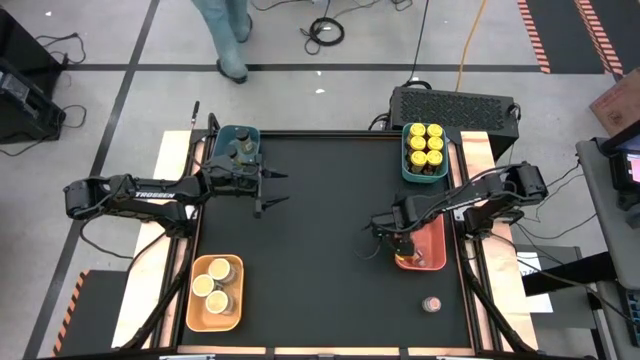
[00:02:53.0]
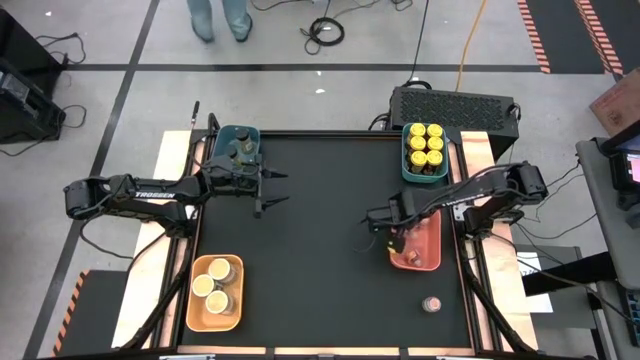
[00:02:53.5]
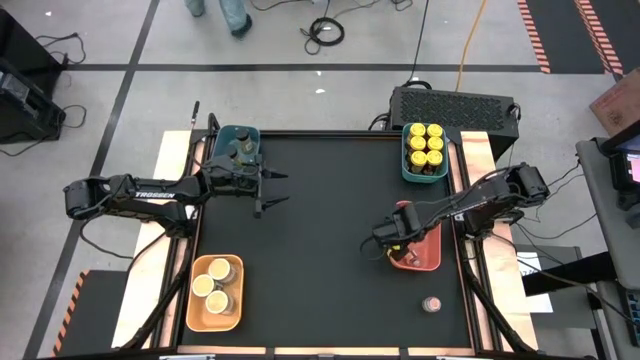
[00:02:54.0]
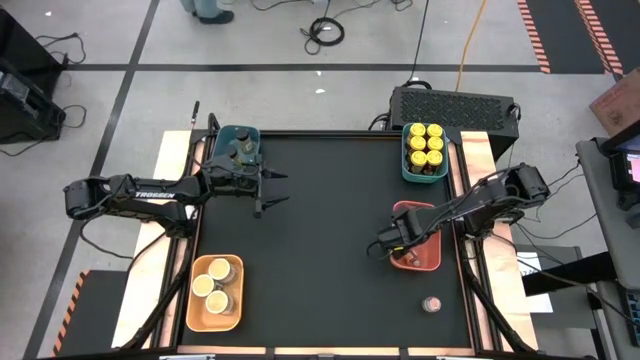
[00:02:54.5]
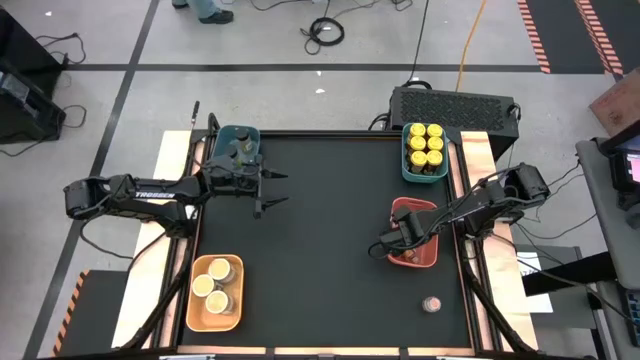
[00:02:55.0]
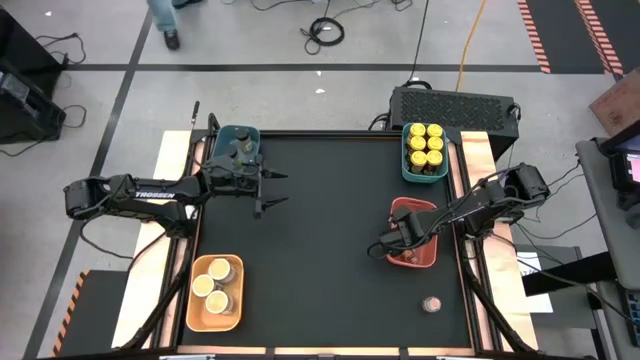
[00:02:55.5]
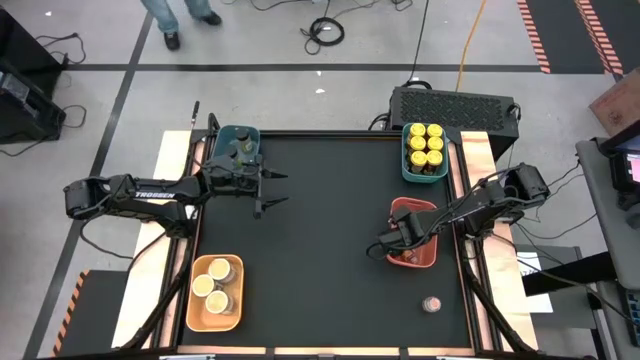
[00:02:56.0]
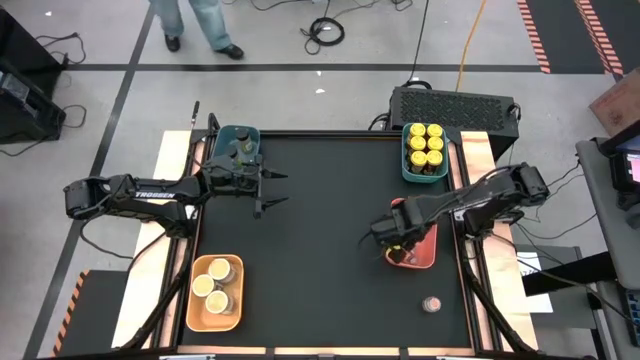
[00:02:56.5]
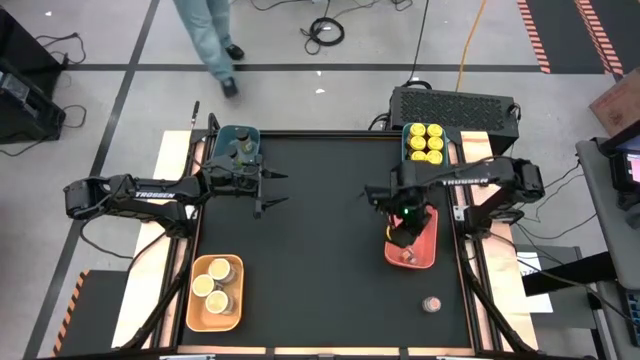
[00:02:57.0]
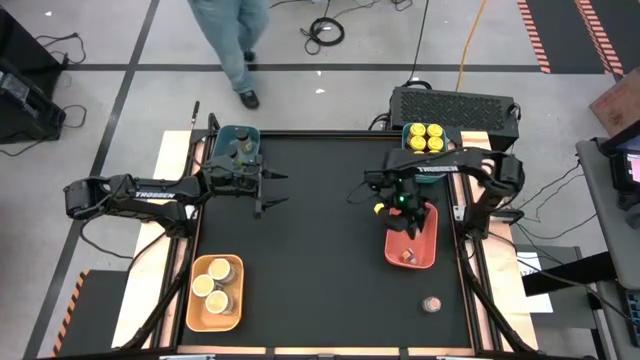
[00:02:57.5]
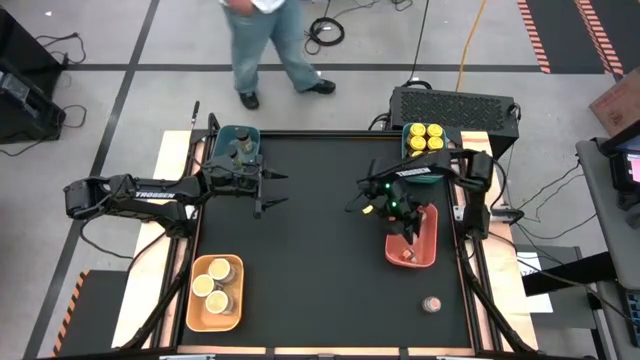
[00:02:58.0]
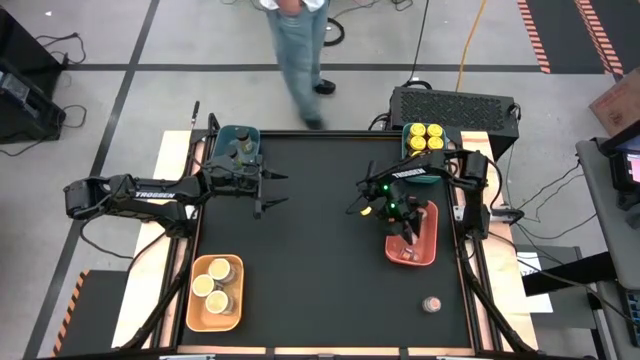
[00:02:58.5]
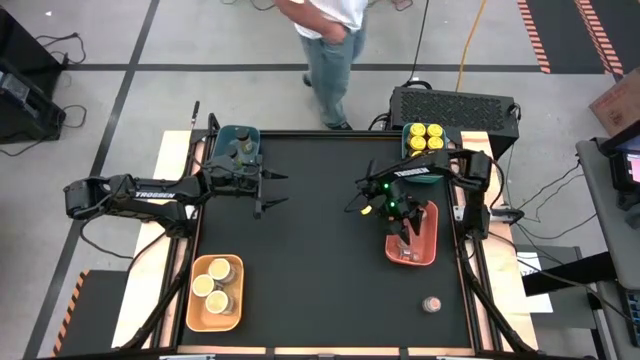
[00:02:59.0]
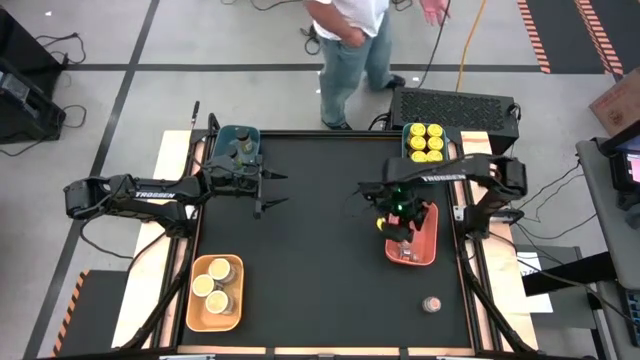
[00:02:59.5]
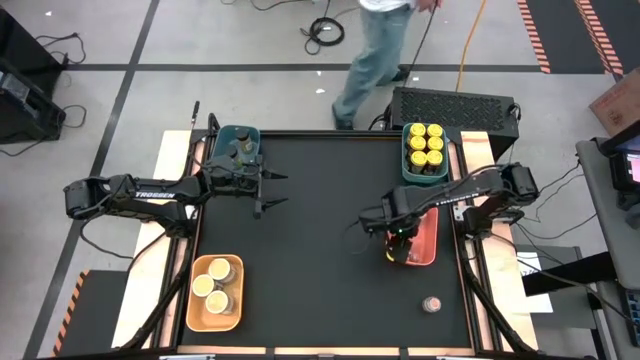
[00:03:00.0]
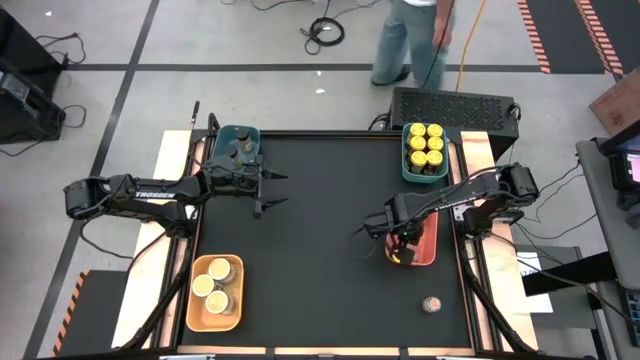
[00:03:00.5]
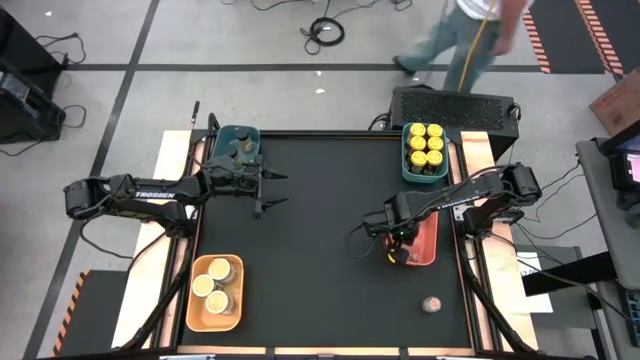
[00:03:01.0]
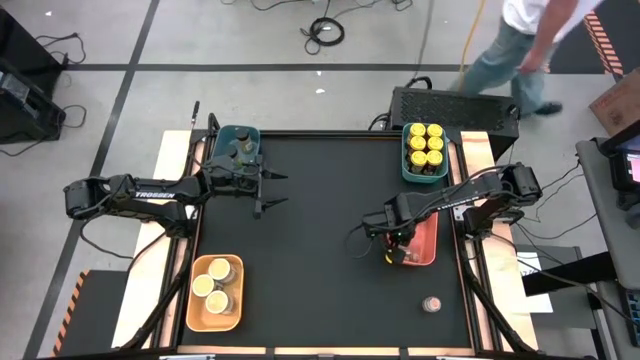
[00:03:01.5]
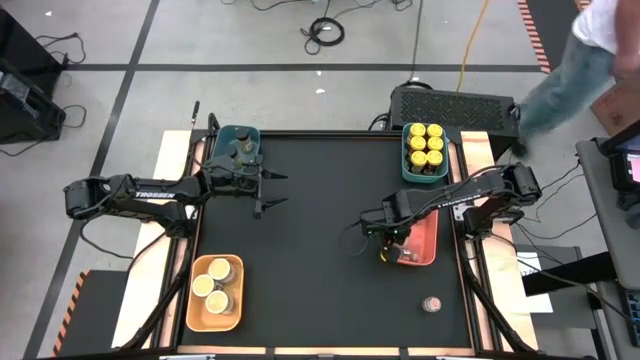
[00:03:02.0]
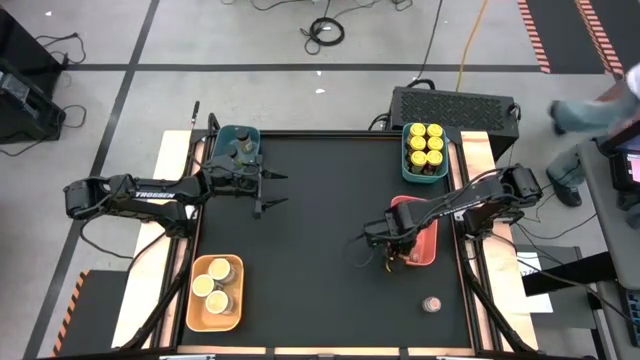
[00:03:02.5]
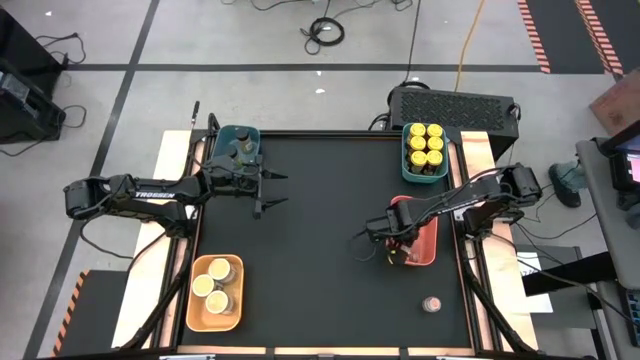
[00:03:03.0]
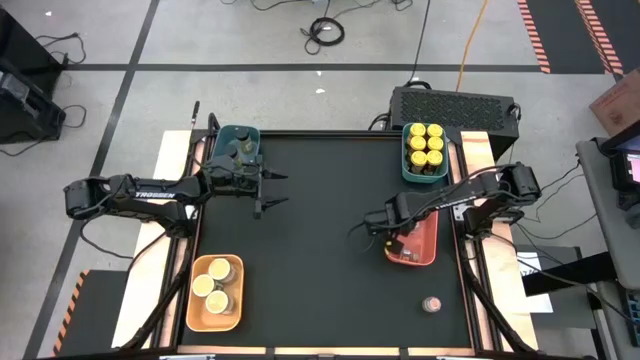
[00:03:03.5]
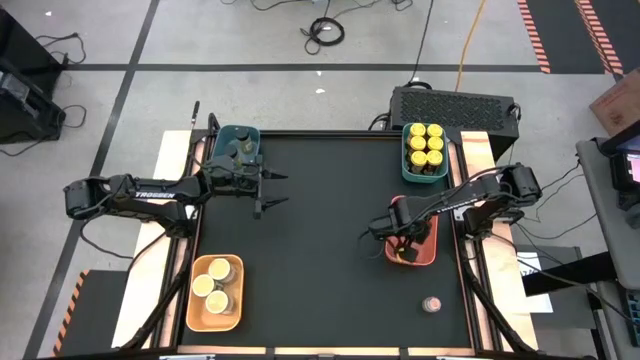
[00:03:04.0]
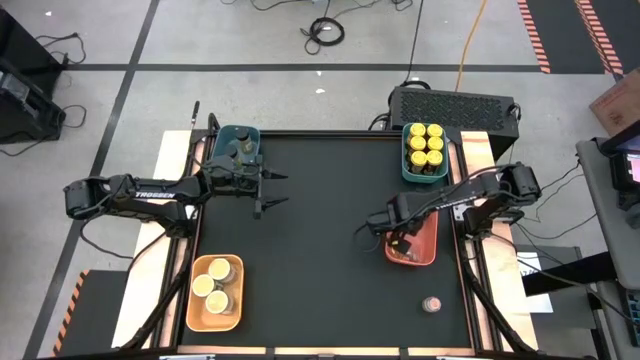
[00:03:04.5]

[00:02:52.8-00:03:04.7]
Task: Sort spices by type
Adjust the brown spice bottle into the orange bin

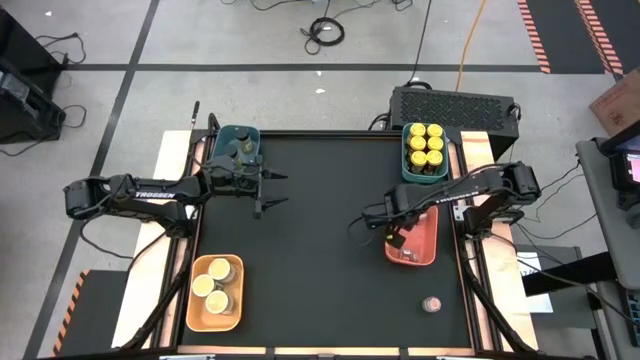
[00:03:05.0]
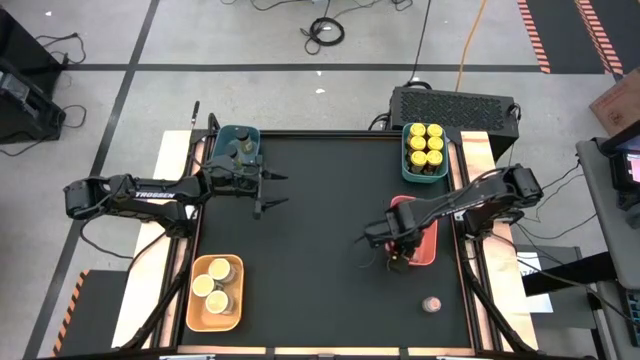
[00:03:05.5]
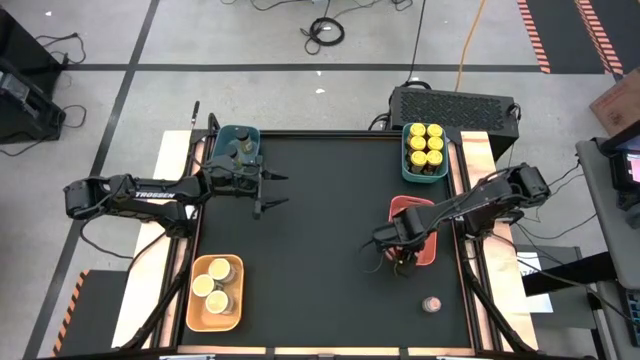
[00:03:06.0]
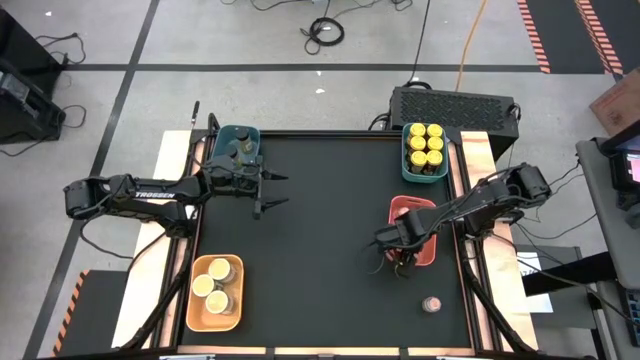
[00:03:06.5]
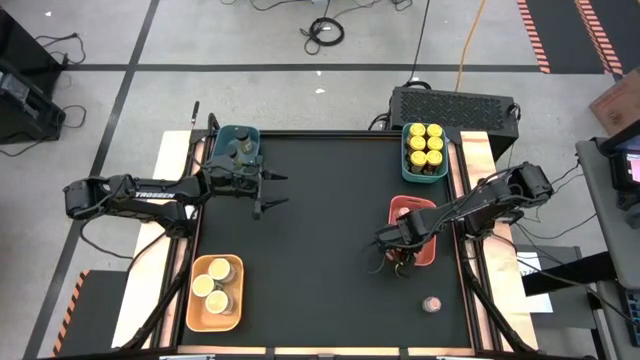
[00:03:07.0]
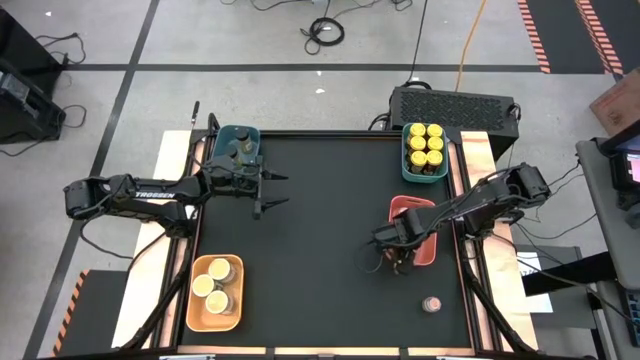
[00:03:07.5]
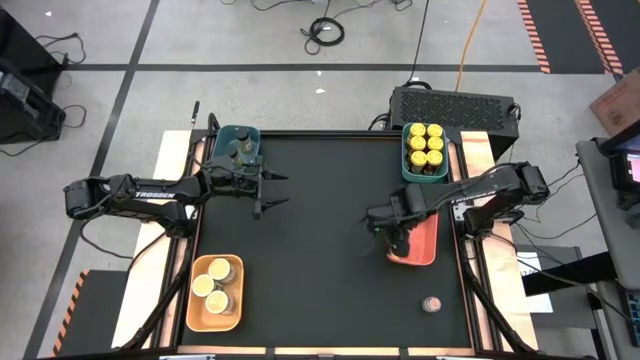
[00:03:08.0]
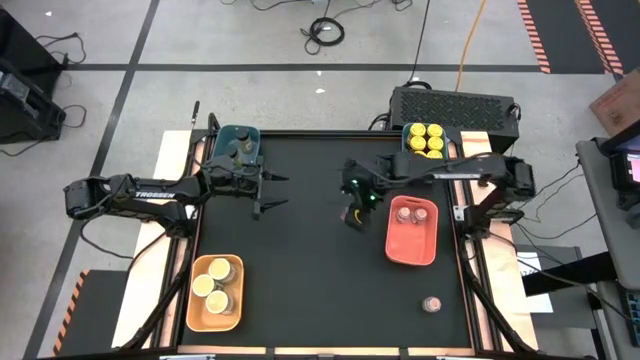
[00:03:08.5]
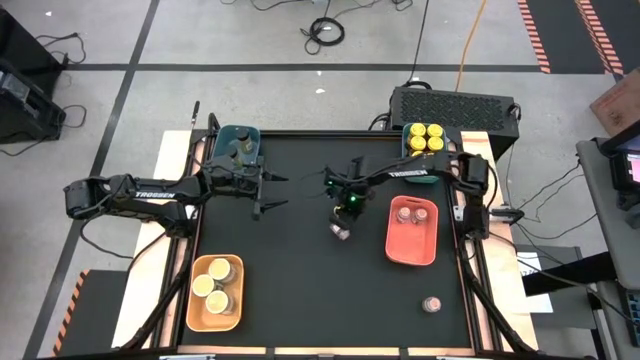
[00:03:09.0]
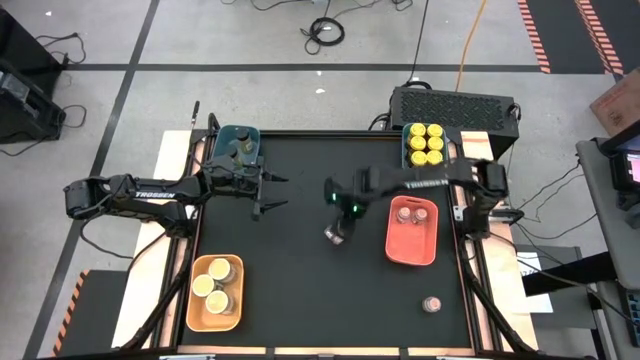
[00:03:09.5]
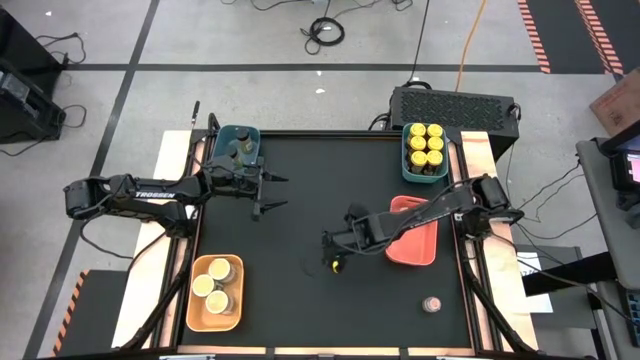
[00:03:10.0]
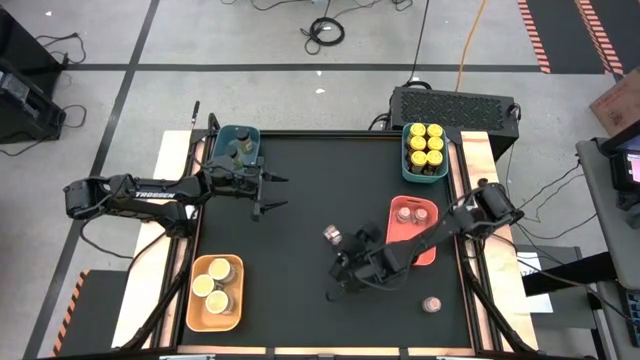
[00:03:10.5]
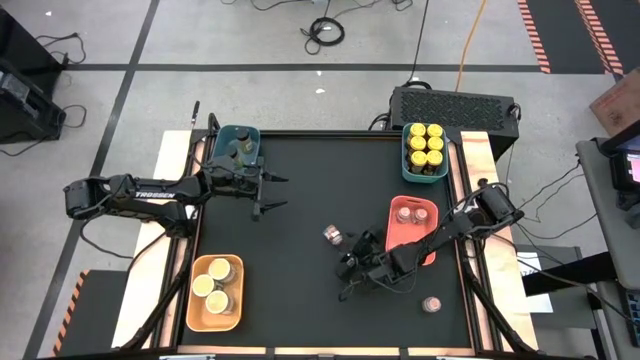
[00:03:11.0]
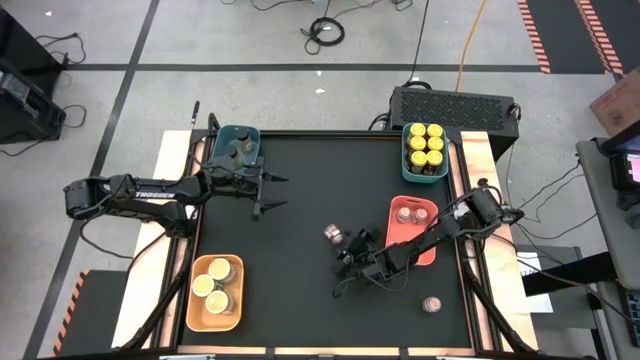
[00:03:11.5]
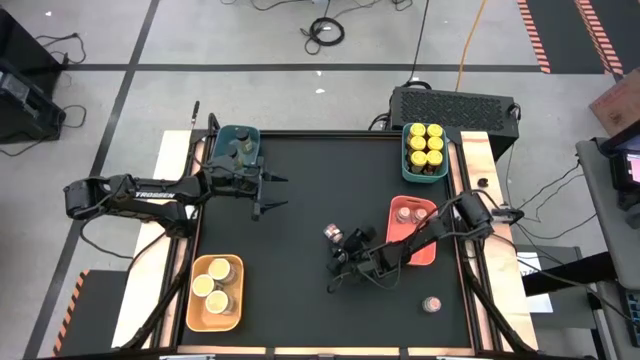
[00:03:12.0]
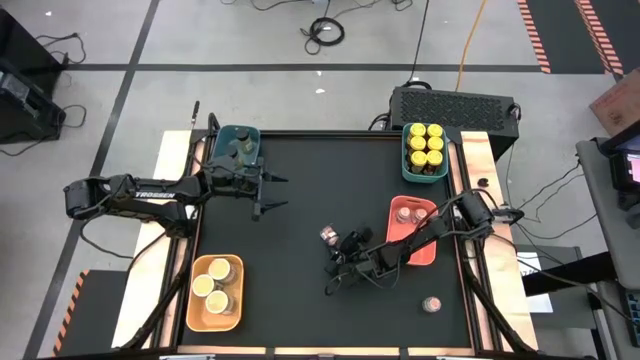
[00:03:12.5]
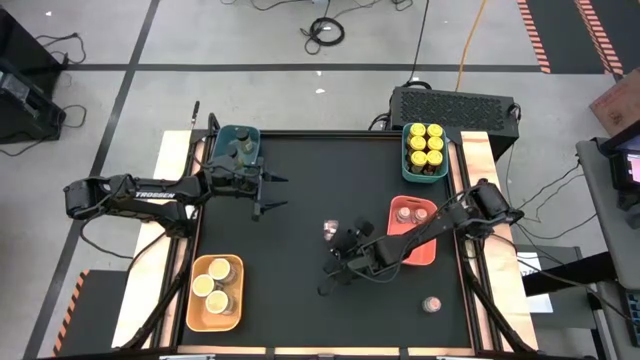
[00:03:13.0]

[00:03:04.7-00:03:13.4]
Adjust the brown spice bottle into the orange bin
